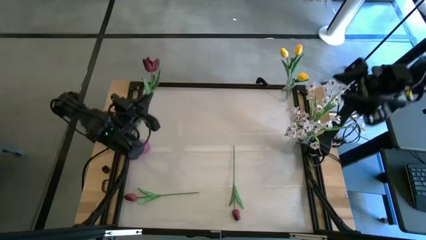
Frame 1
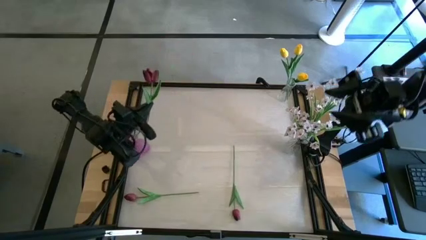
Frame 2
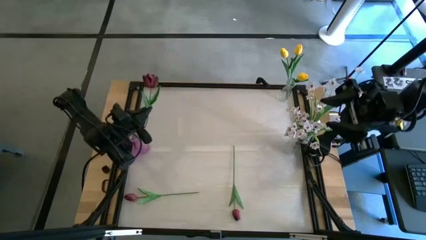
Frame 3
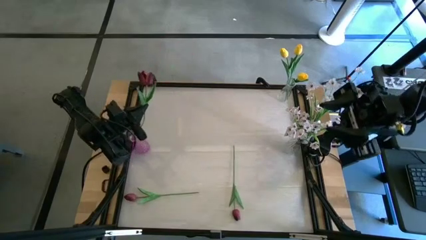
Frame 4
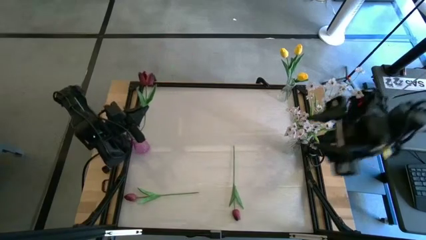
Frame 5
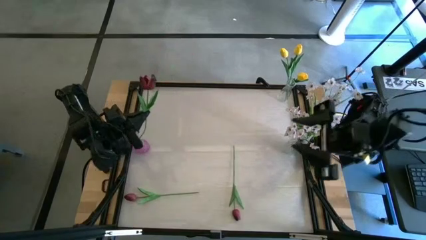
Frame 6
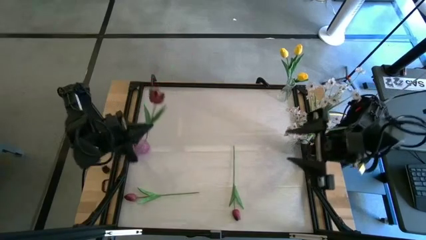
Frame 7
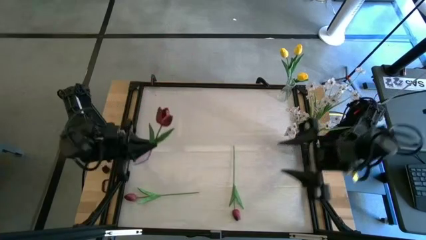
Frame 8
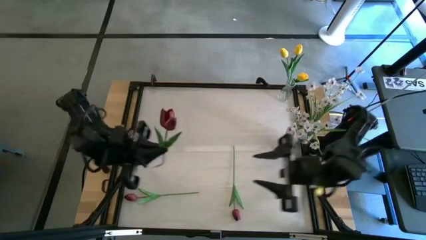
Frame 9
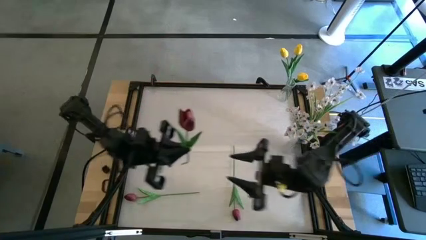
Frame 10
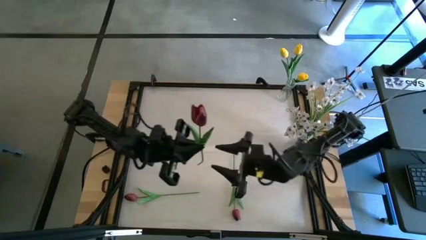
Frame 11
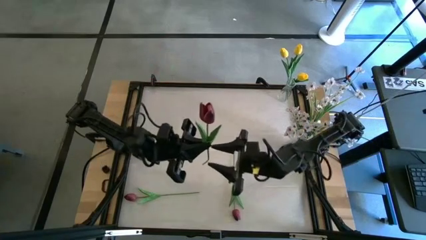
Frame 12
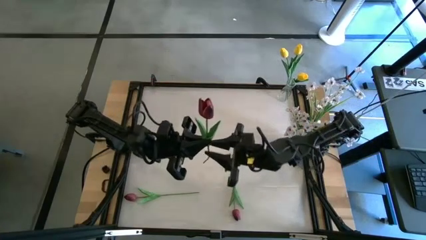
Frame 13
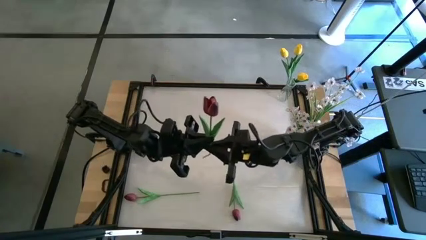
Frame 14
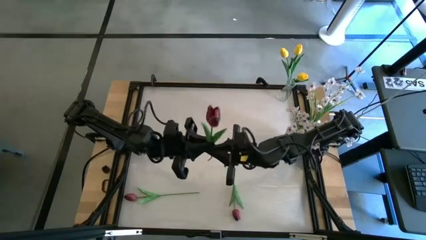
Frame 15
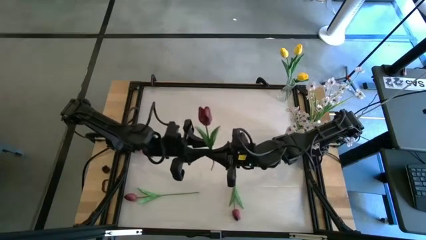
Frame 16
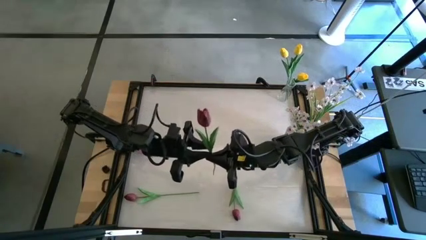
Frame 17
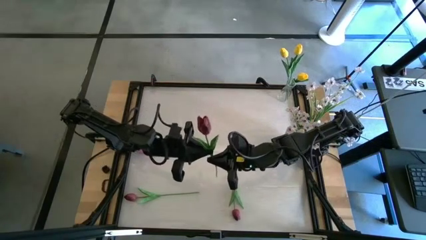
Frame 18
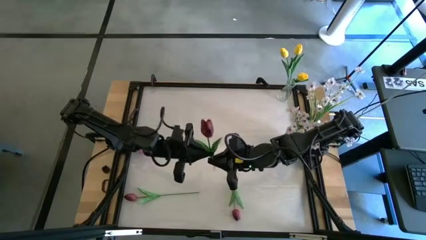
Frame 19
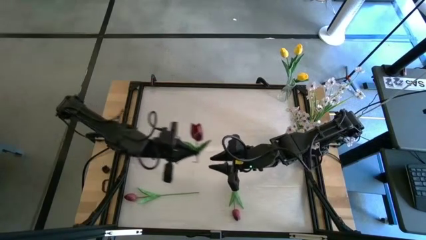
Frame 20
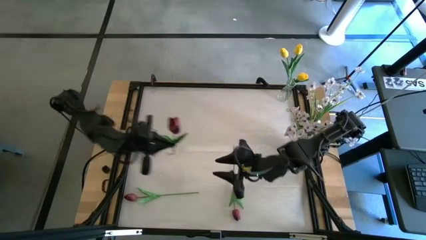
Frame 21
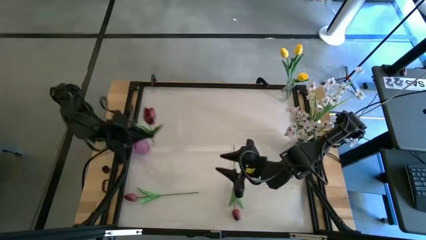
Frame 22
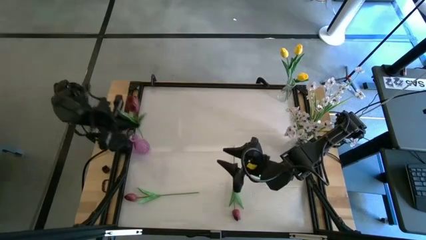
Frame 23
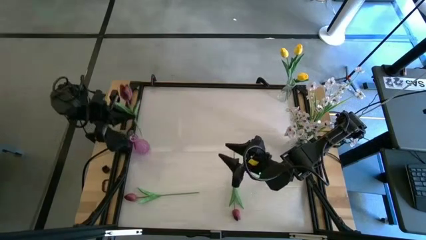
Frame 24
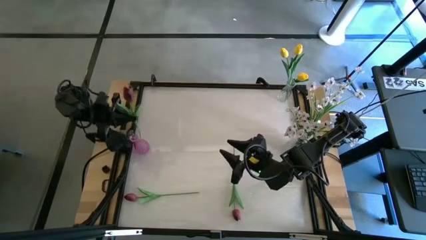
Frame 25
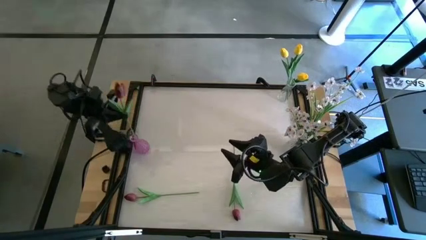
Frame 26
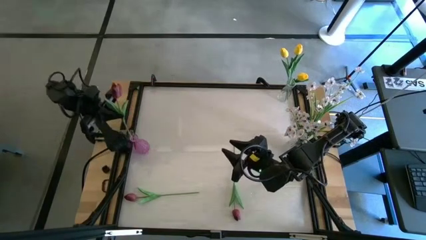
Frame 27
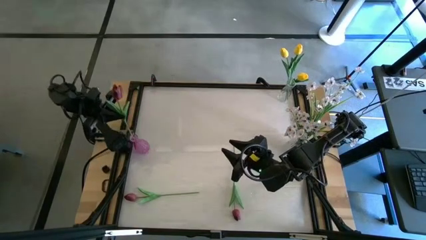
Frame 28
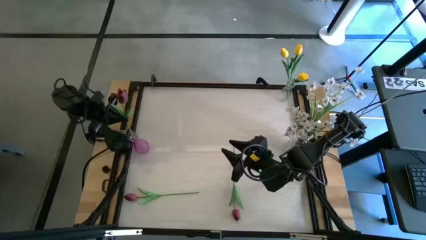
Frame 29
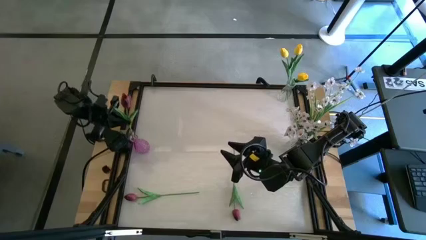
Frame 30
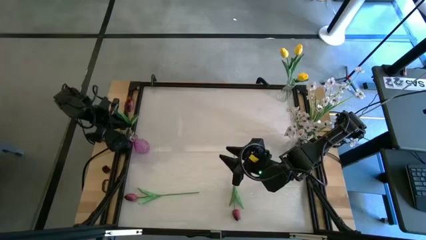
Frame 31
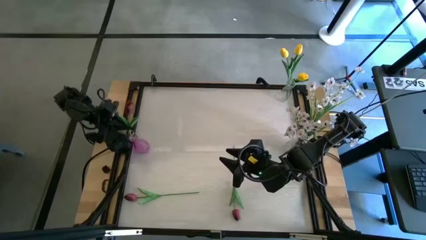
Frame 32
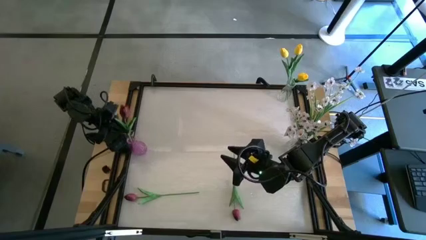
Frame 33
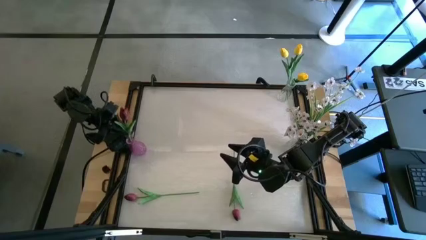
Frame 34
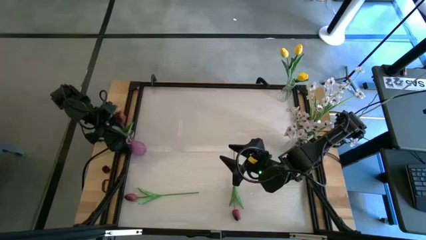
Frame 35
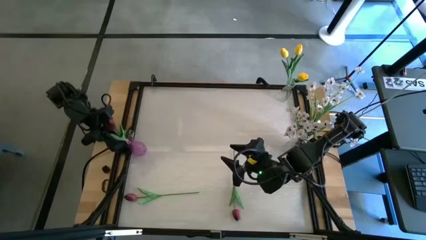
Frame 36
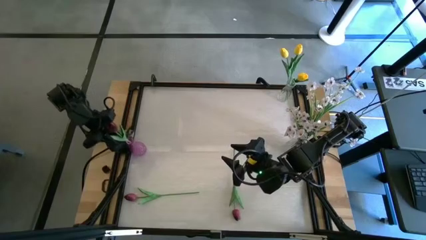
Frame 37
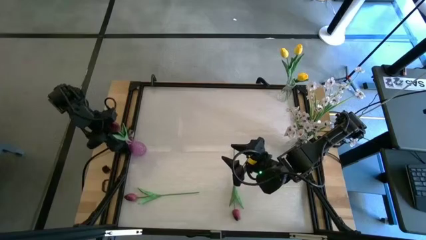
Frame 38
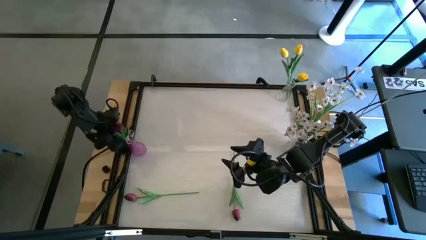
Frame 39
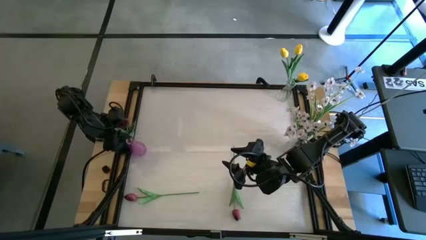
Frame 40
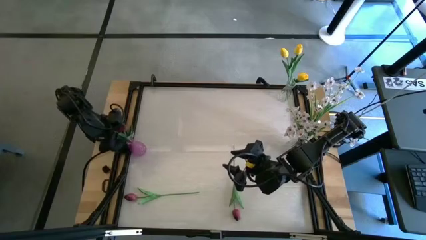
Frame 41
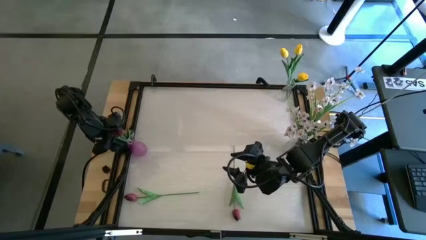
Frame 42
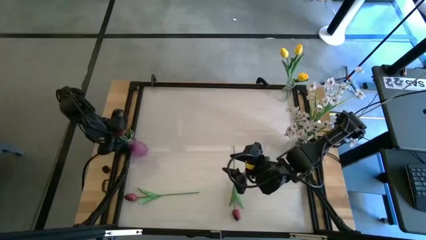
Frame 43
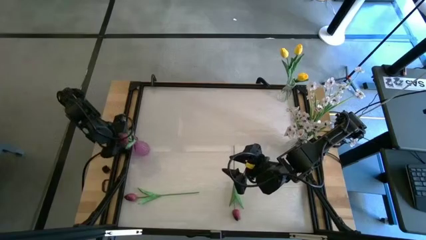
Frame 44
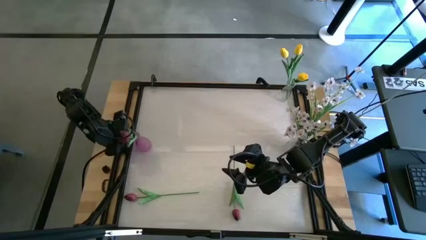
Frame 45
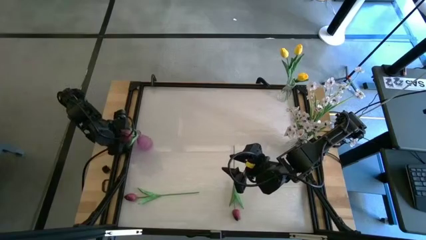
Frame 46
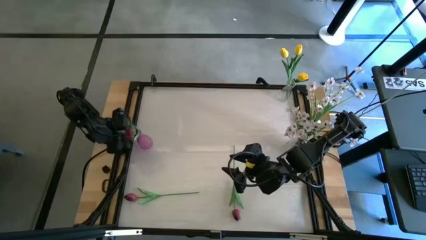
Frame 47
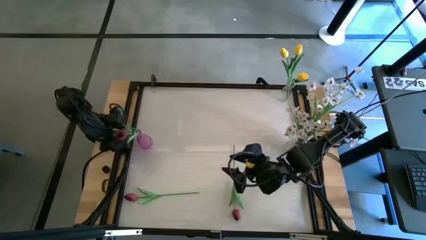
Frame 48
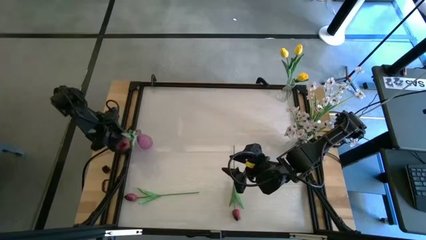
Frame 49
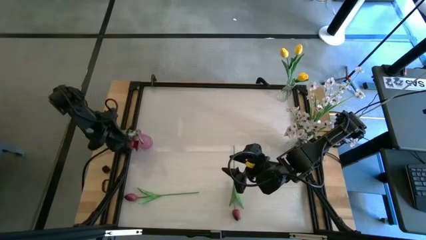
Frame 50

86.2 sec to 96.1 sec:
Task: Sort flowers into vase by color
Put the top red flower into the purple vase

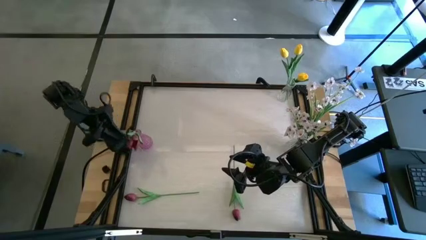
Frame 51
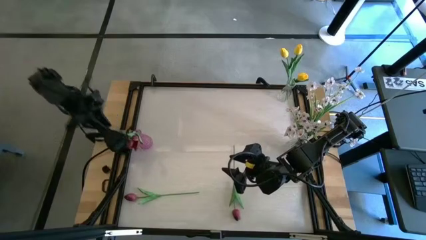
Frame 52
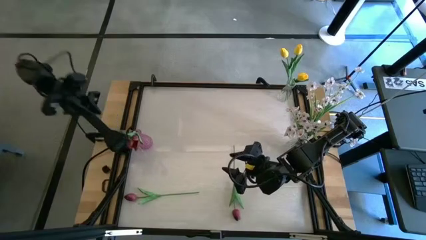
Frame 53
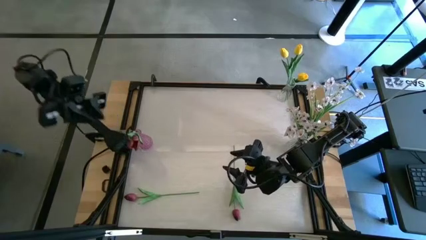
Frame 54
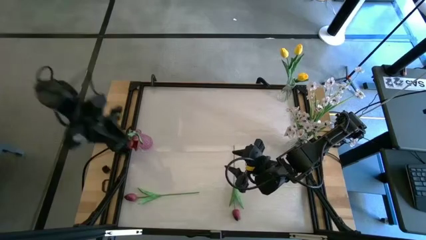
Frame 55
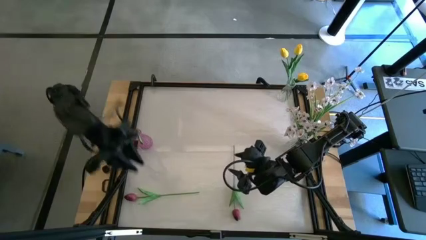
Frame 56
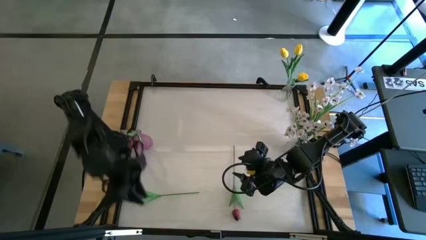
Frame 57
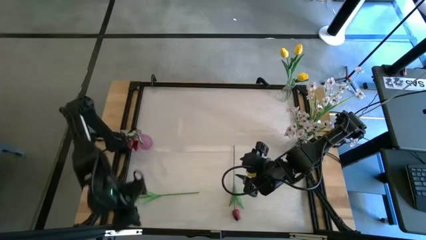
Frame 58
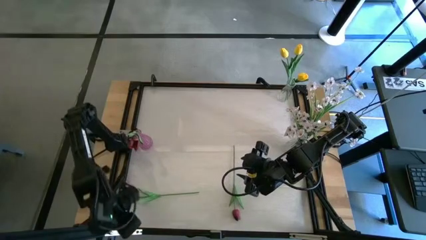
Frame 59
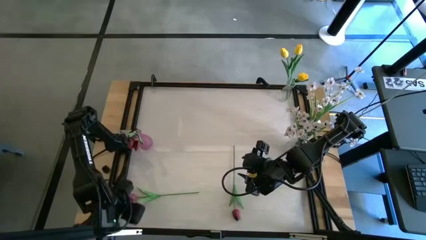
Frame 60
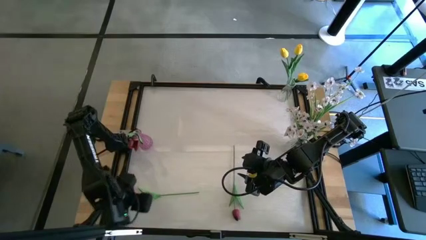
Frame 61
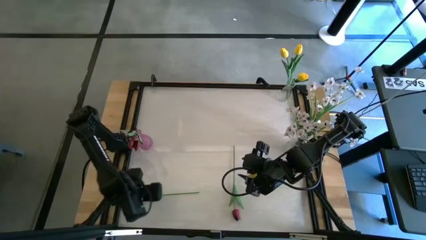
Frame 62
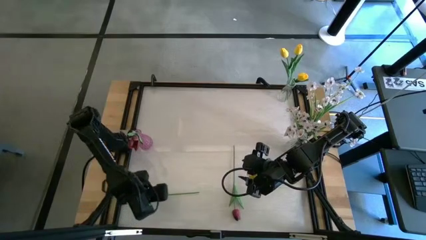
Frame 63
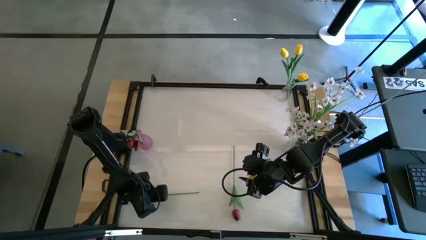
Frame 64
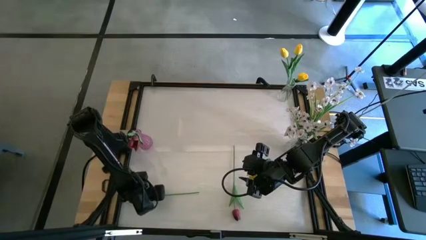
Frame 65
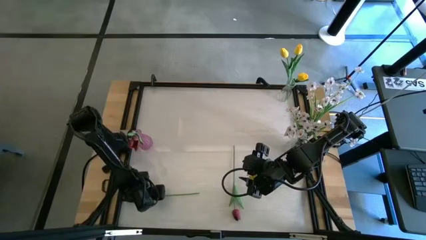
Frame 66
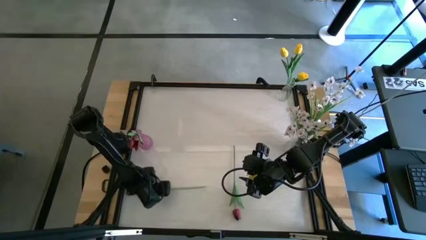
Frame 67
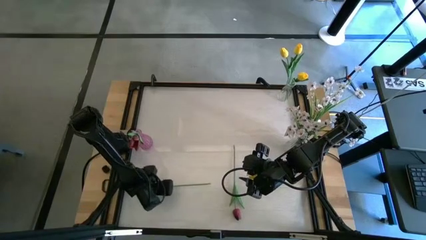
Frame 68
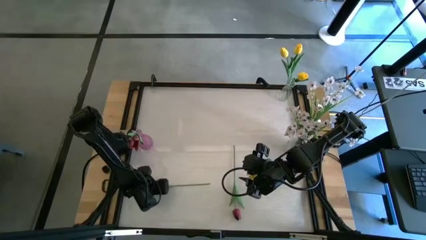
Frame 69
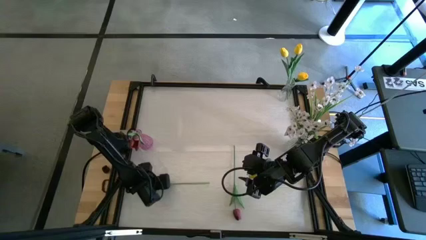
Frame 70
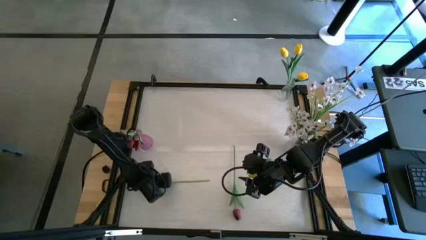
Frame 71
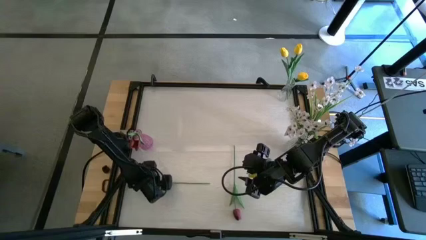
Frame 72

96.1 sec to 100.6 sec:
Put the left red flower into the purple vase

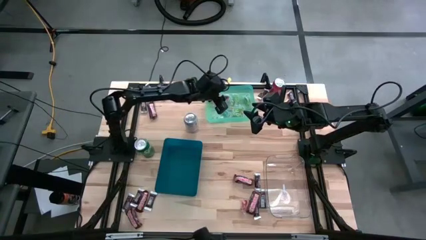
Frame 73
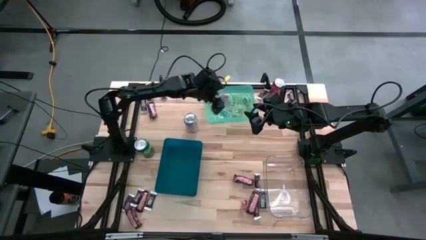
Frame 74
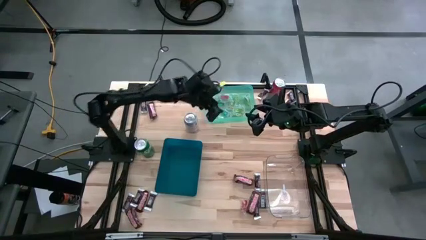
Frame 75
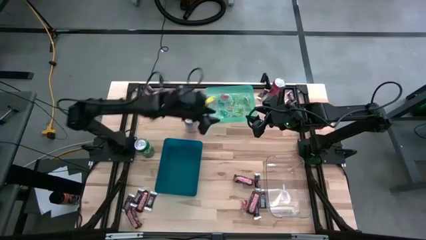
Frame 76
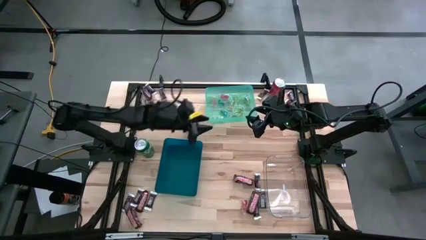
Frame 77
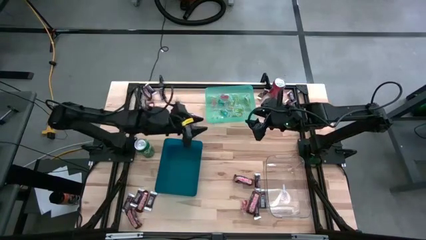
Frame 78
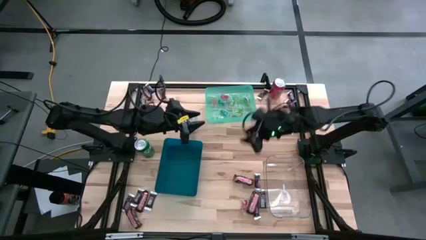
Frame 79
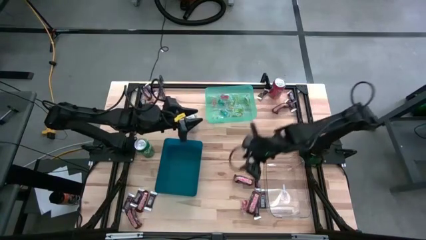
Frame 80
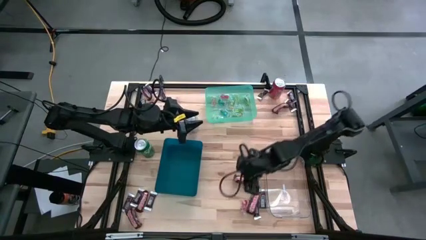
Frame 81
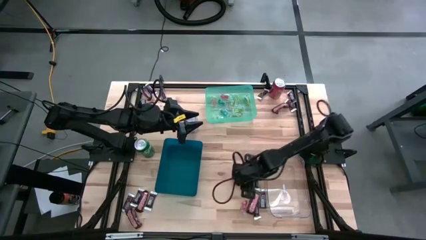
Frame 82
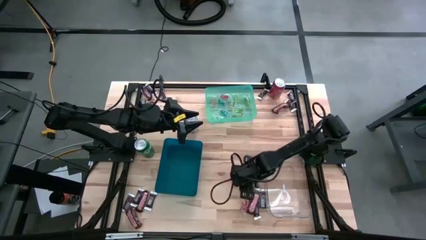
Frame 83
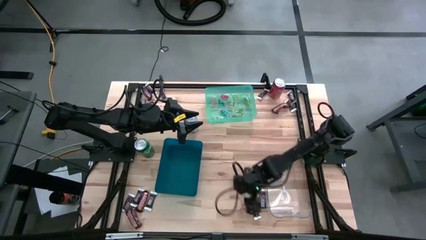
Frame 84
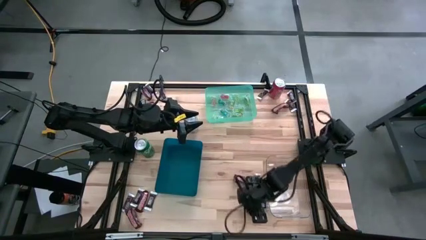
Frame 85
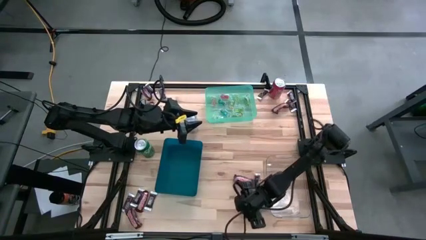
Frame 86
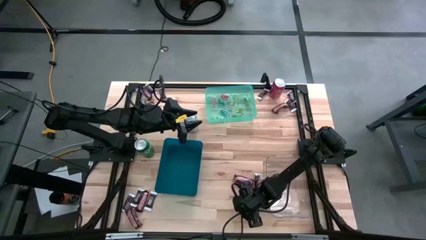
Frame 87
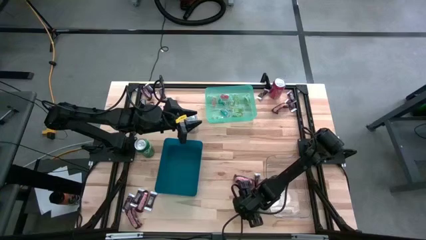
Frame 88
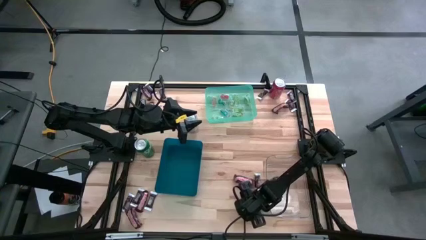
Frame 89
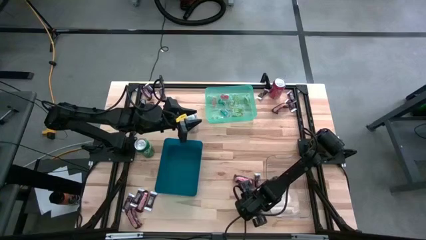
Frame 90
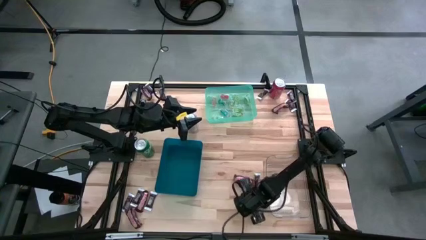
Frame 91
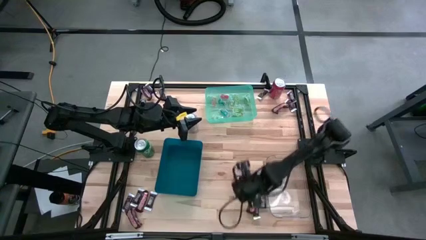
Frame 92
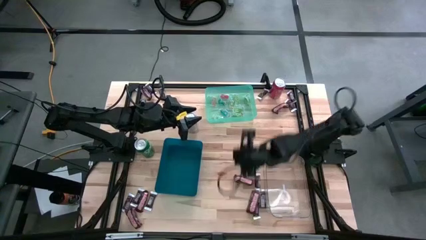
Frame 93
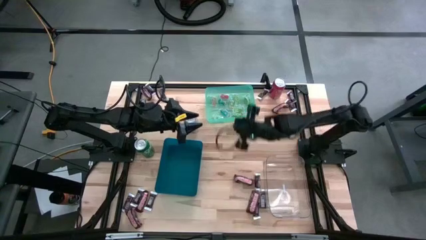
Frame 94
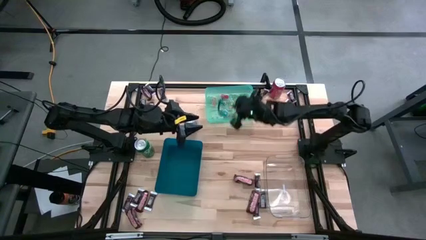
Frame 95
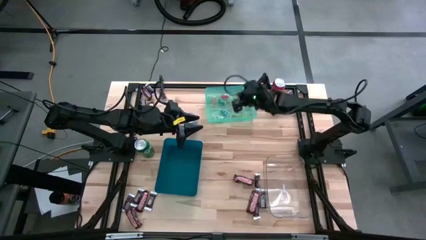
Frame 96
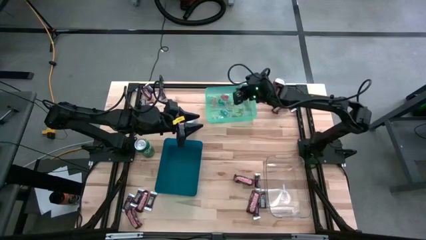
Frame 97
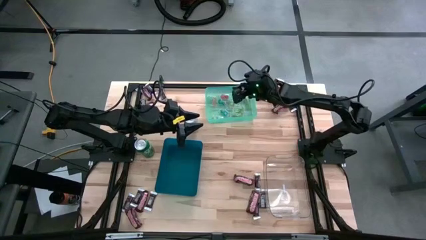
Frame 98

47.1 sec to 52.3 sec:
Task: Organize candy in baskets
Put the transparent gummy into the green bin
